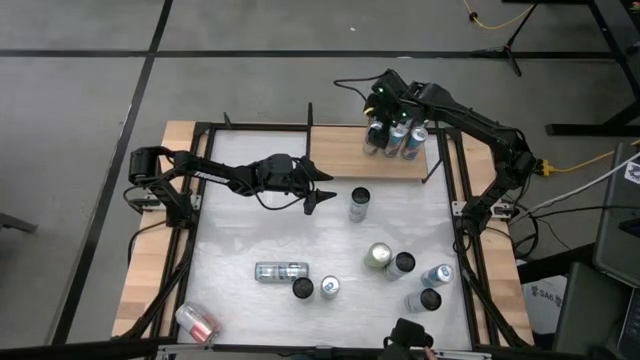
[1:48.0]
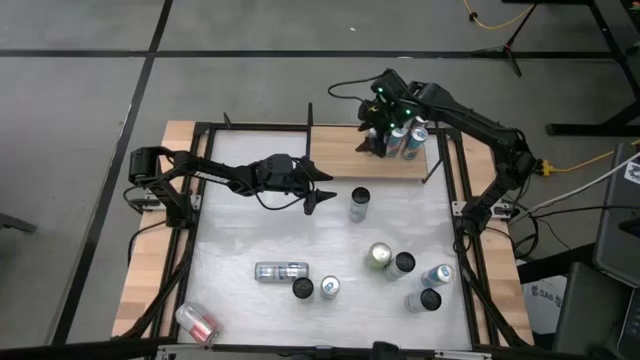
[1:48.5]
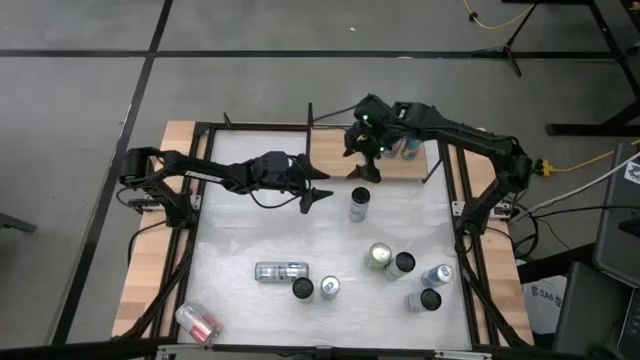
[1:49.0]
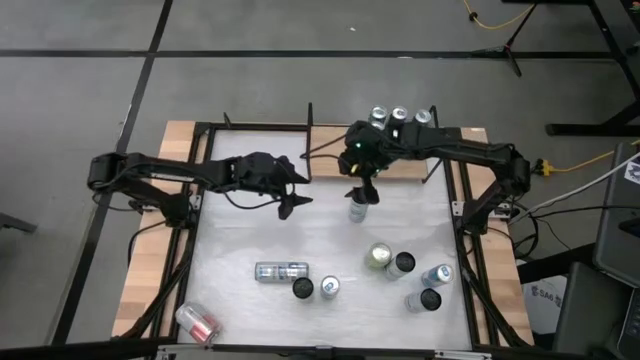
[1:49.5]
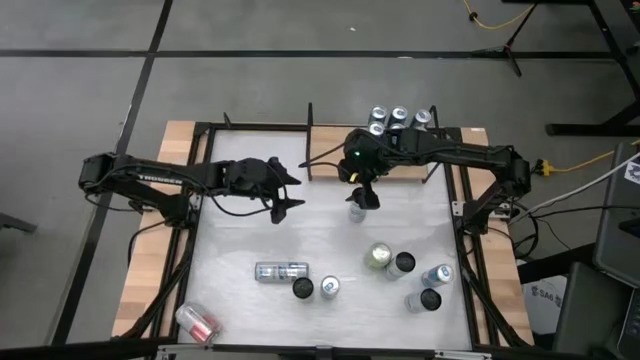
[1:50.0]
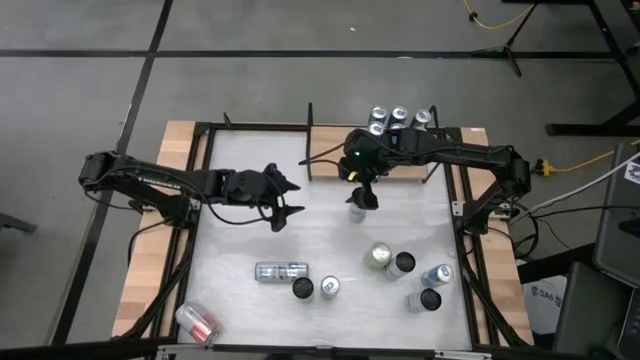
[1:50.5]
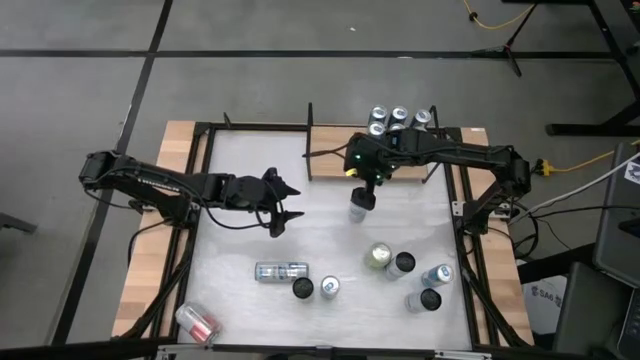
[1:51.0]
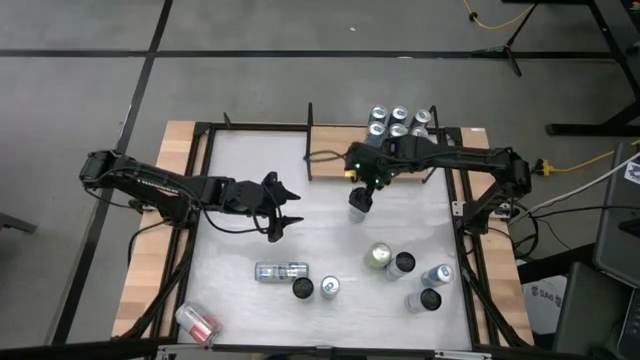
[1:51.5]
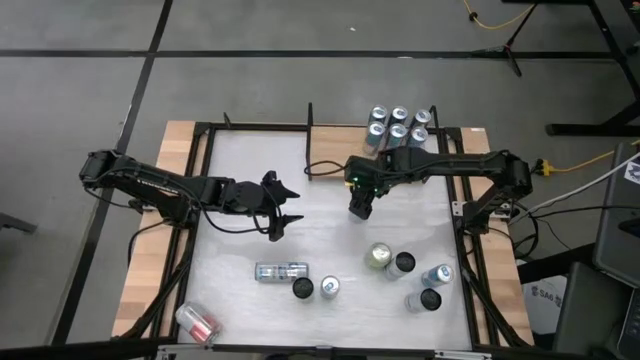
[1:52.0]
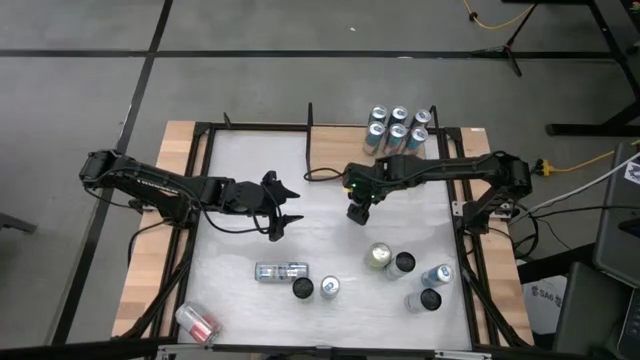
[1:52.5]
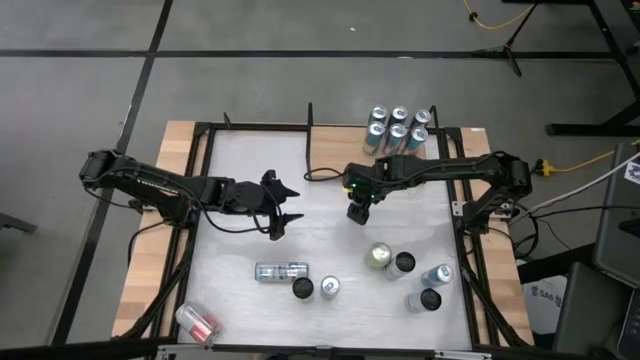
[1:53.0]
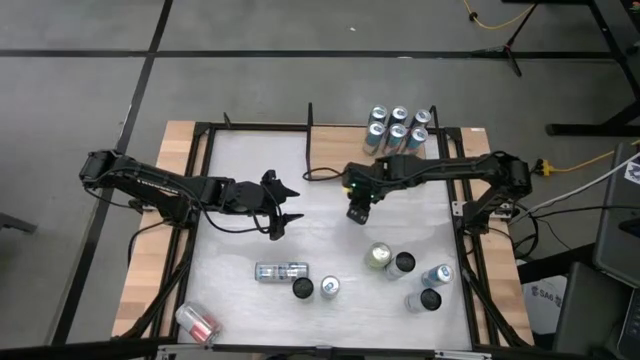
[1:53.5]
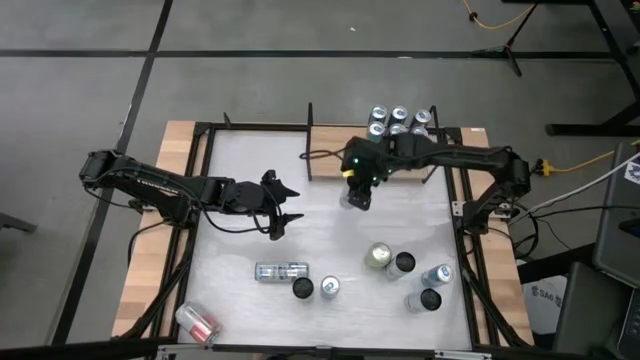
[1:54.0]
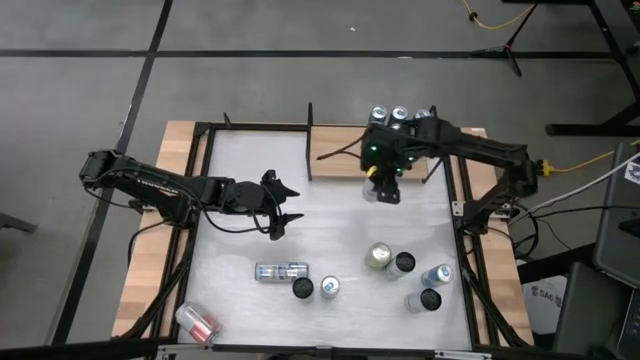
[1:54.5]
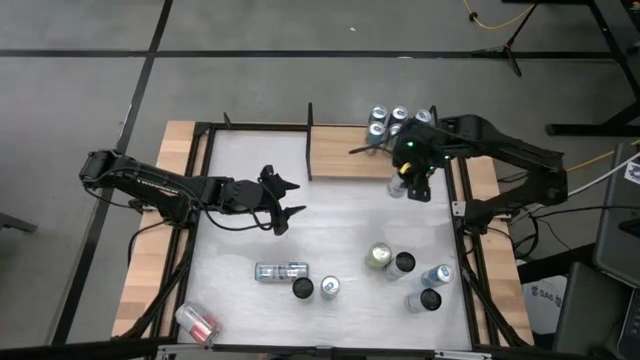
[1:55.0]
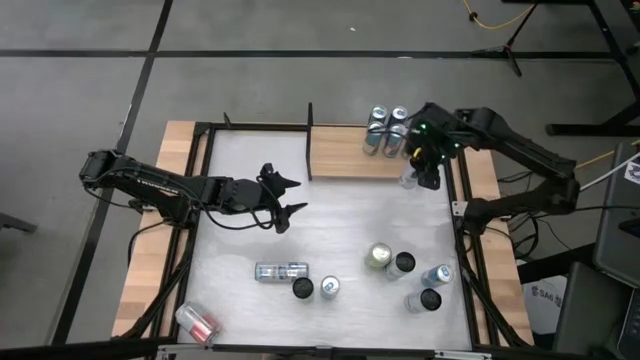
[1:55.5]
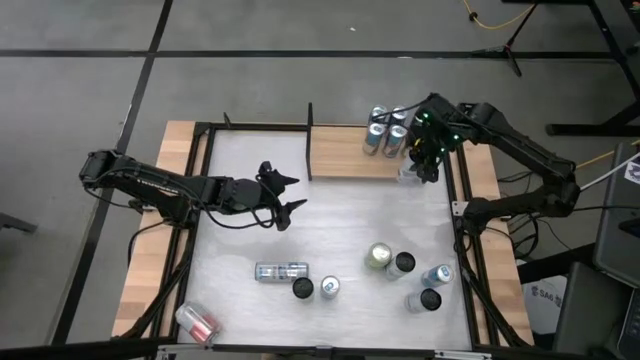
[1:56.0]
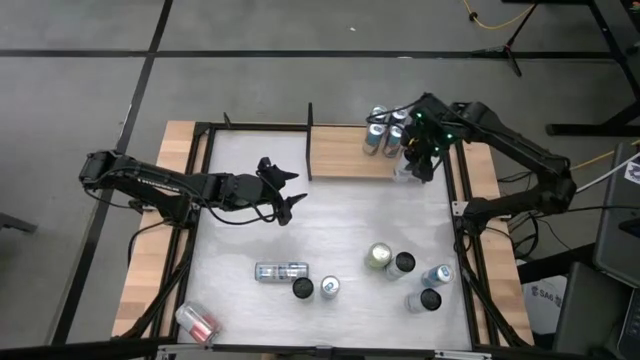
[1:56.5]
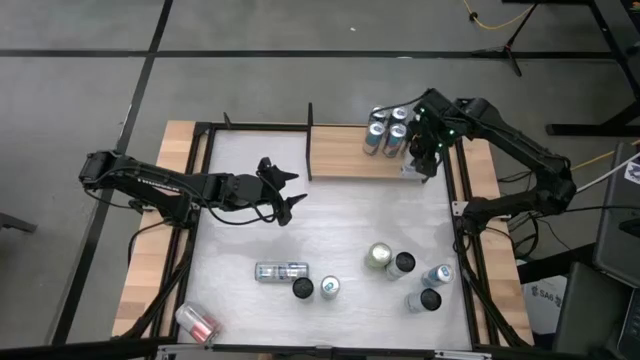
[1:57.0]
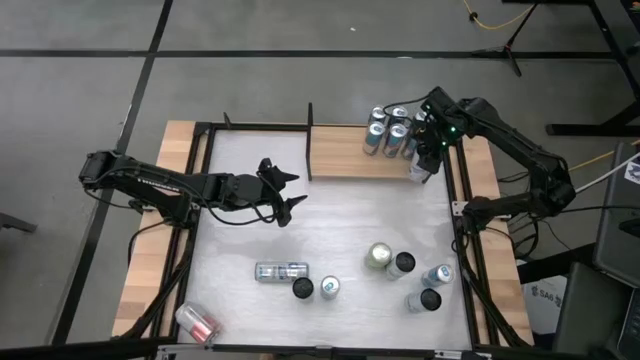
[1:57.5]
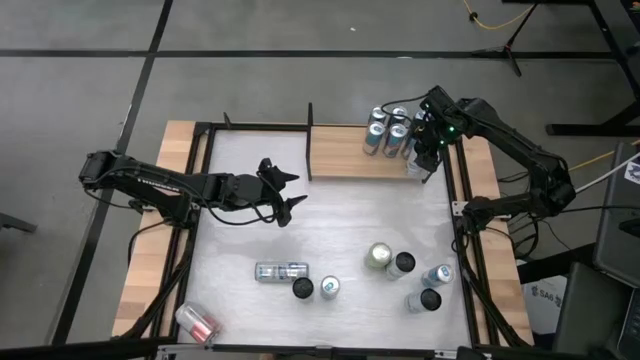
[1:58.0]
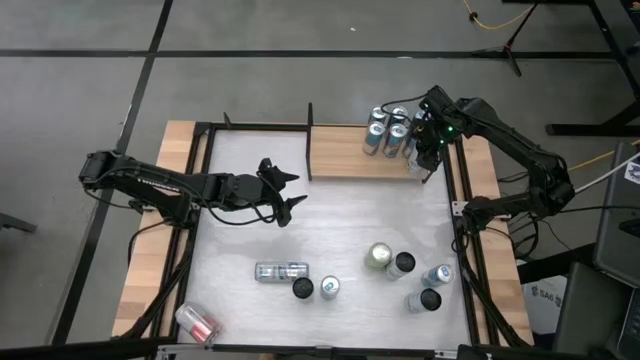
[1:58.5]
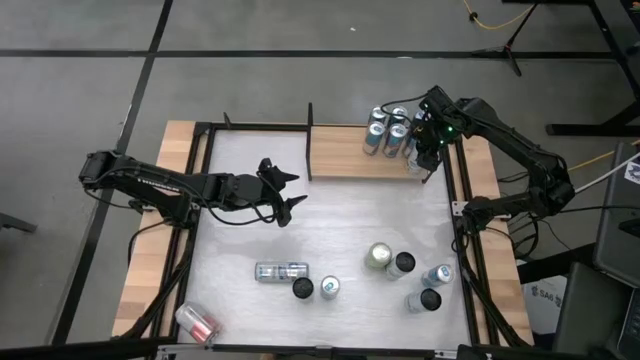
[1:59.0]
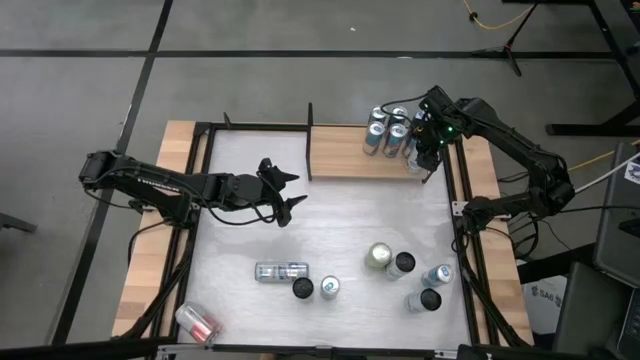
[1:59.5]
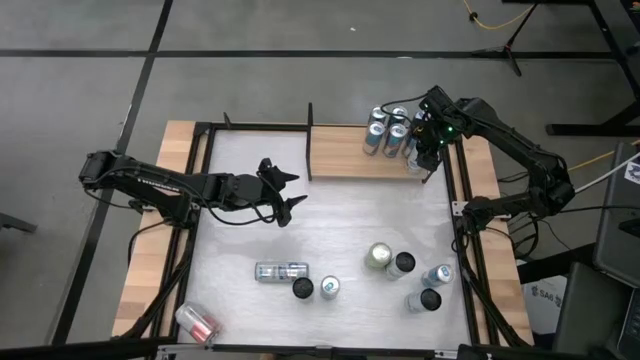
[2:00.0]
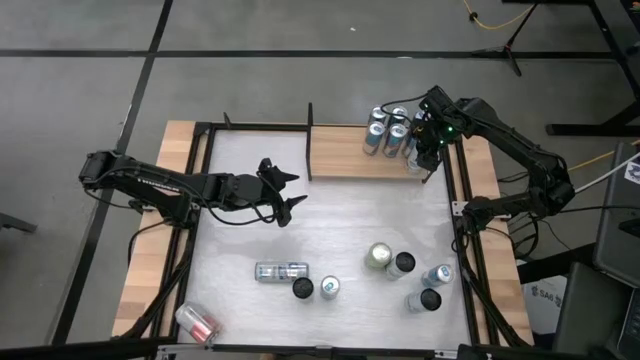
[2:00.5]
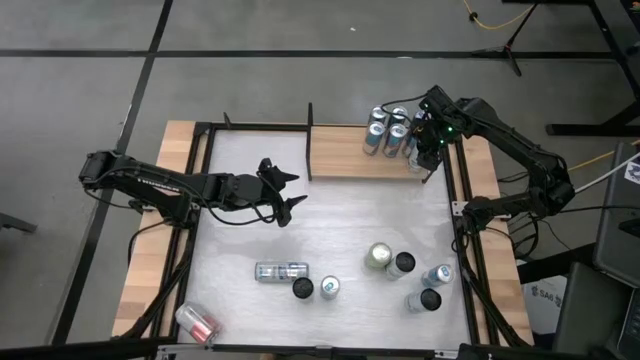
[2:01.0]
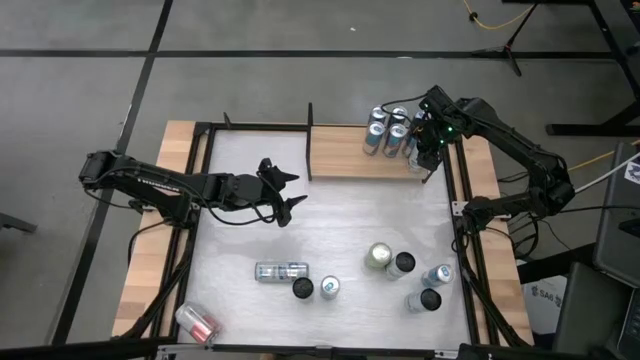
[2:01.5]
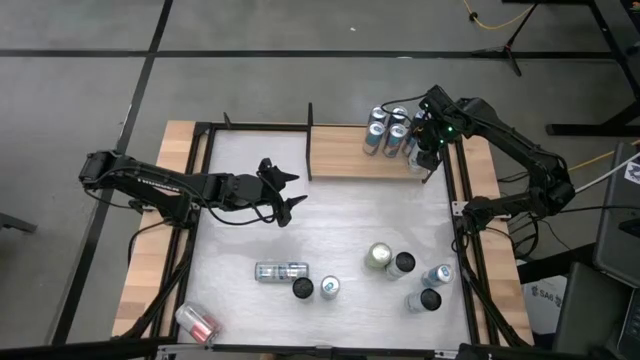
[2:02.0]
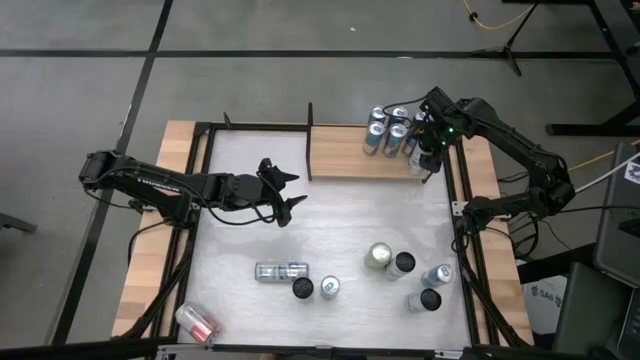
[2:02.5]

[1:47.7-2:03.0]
Task: Place canned beverage on shelf
Put the white-blue soda can on the shelf

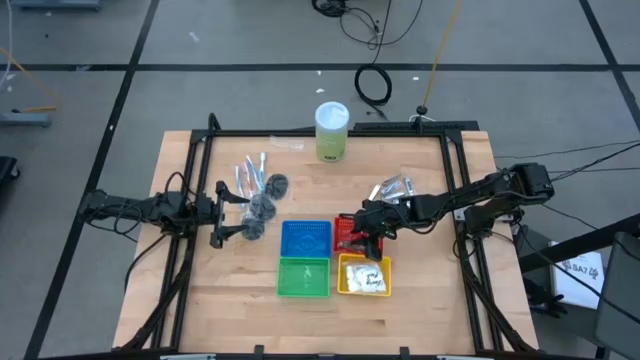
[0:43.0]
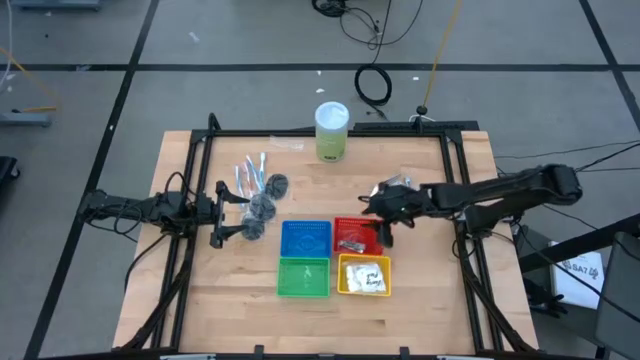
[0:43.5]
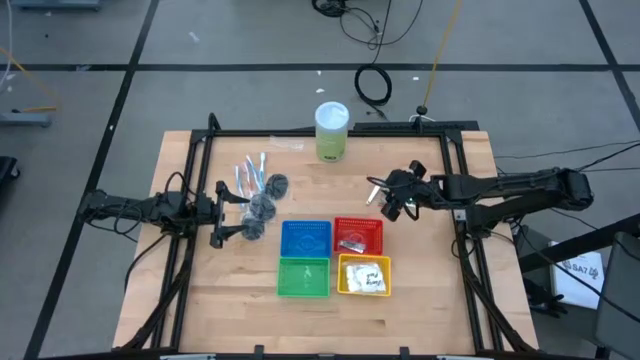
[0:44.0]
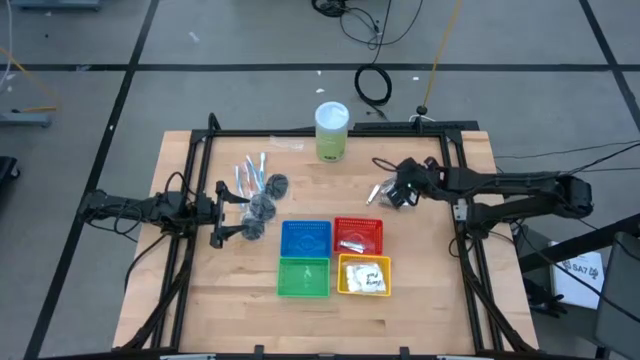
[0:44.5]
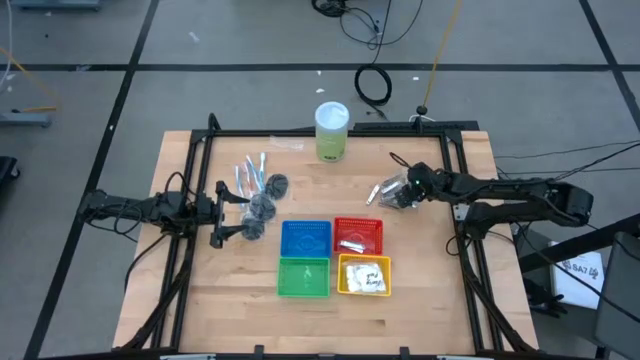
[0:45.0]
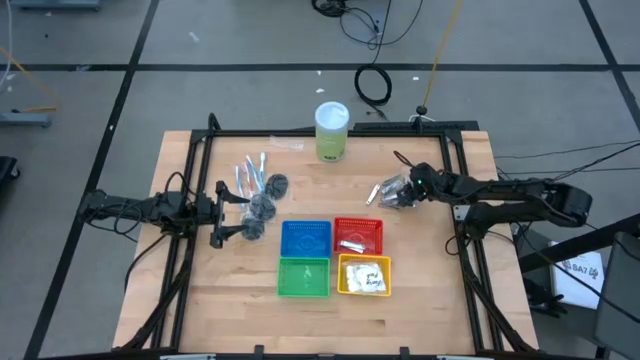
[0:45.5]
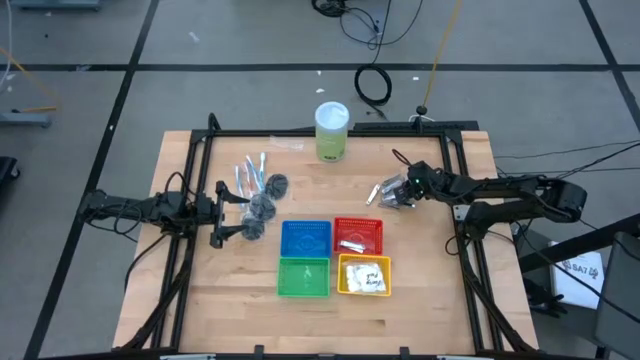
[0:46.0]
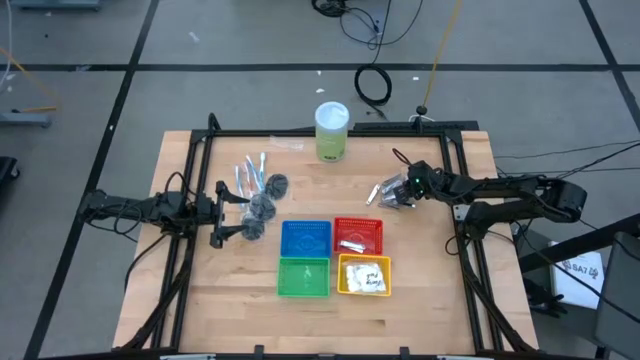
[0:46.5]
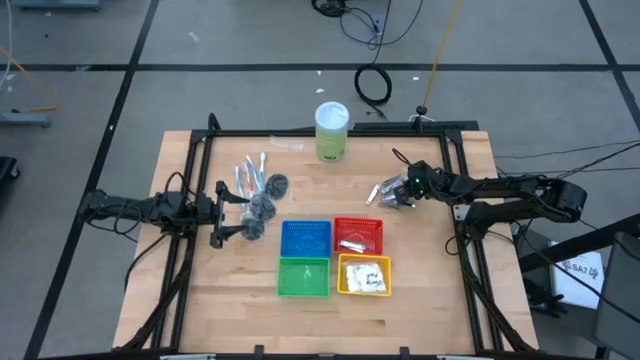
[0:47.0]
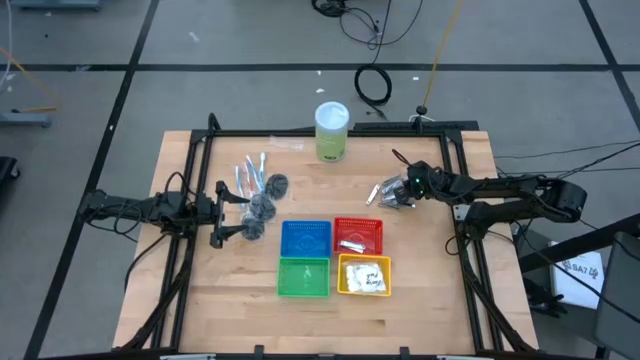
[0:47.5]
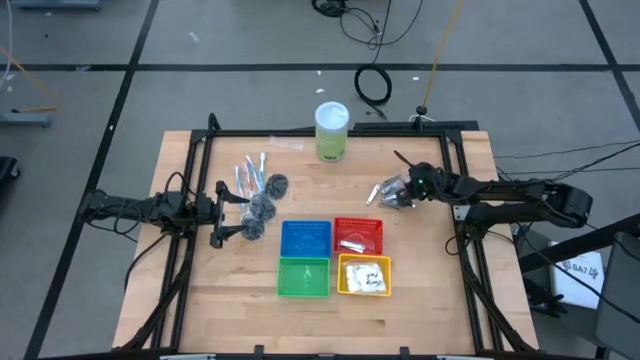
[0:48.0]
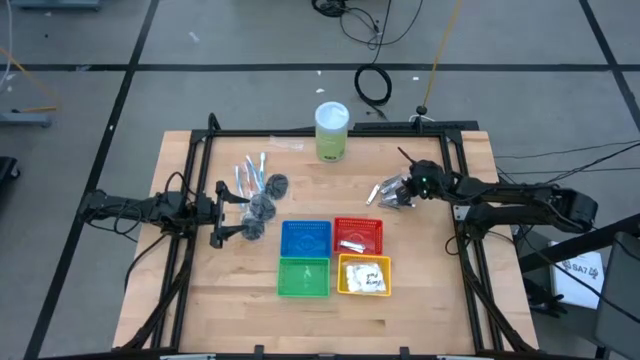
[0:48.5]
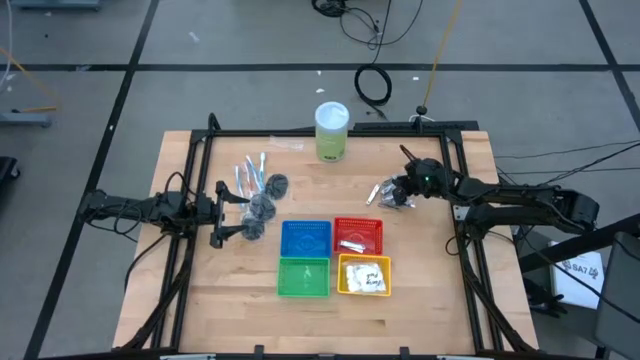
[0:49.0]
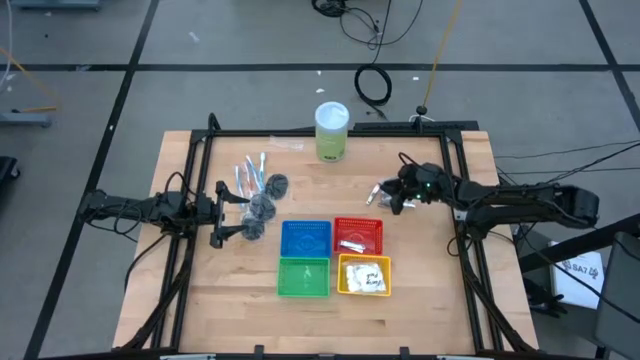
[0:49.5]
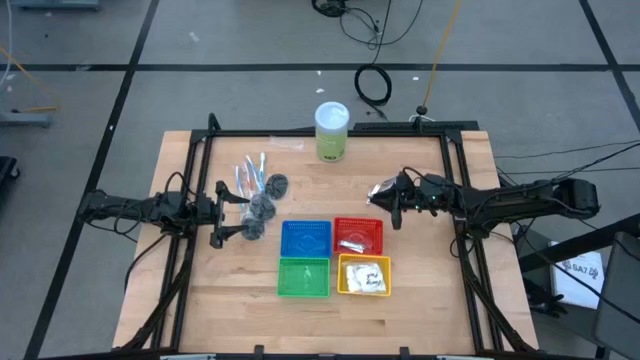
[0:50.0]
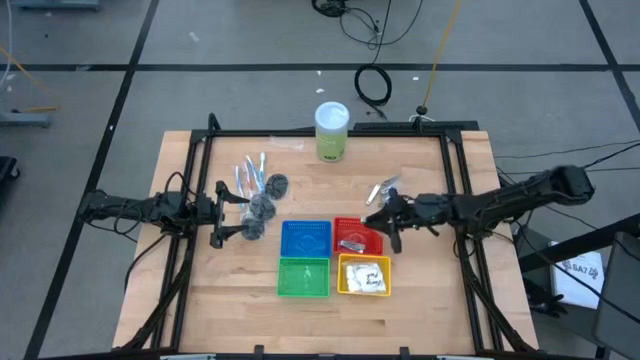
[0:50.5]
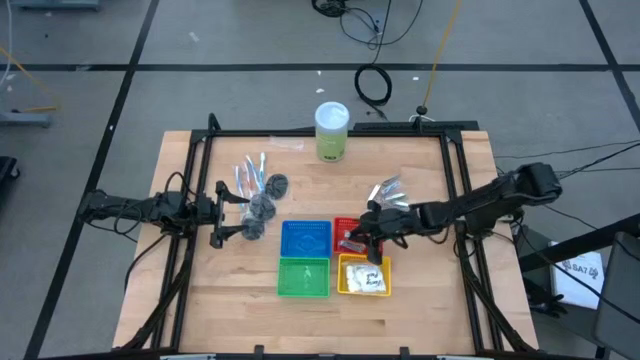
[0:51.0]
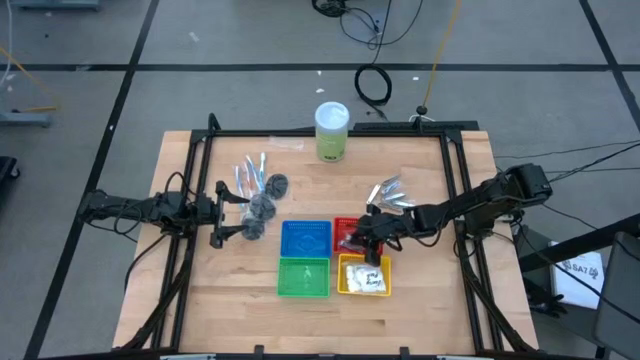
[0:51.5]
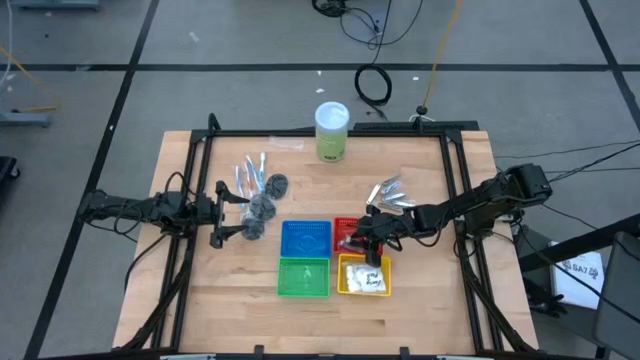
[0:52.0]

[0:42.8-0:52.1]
Task: Pick & Place Travel size toiletries
Put the nail cutter into the red basket
